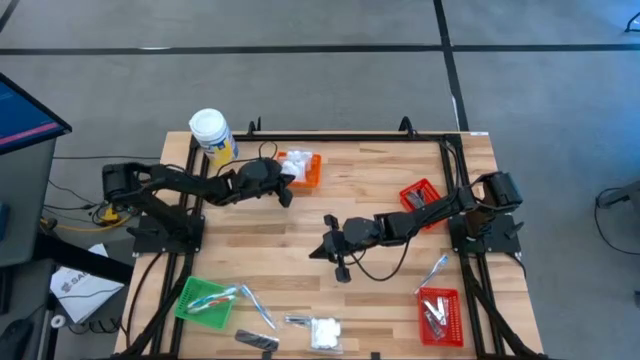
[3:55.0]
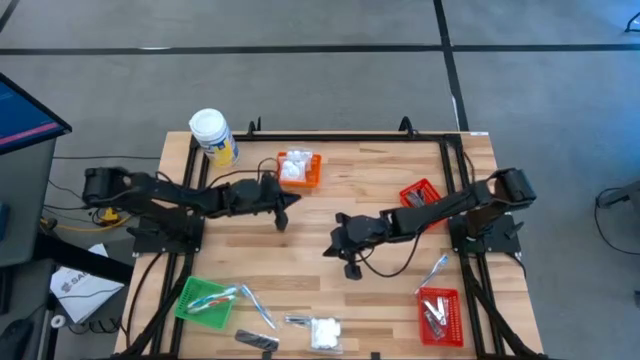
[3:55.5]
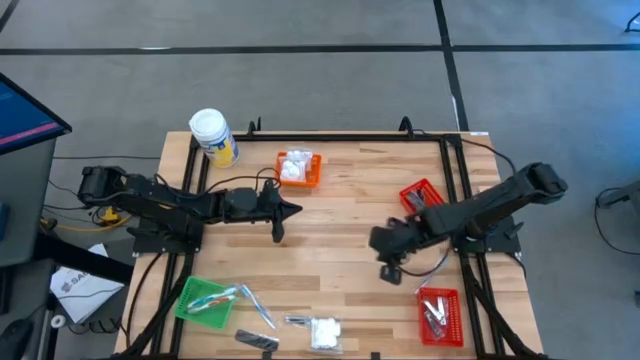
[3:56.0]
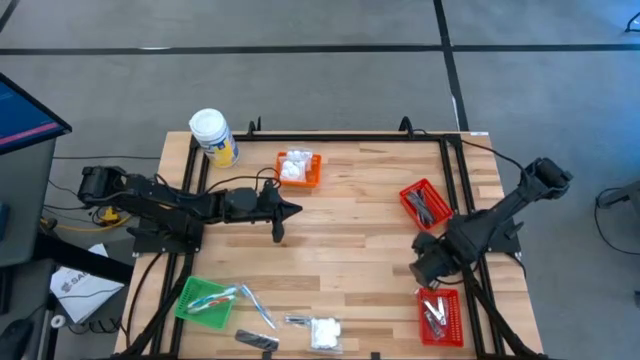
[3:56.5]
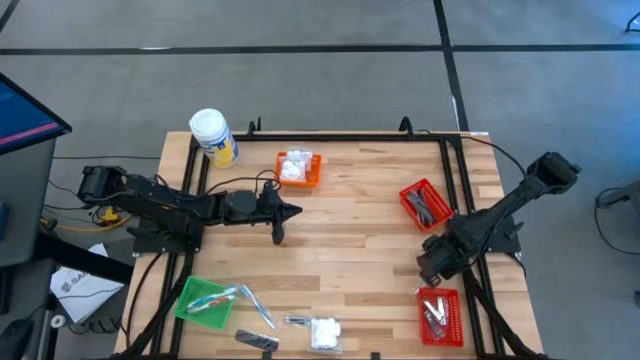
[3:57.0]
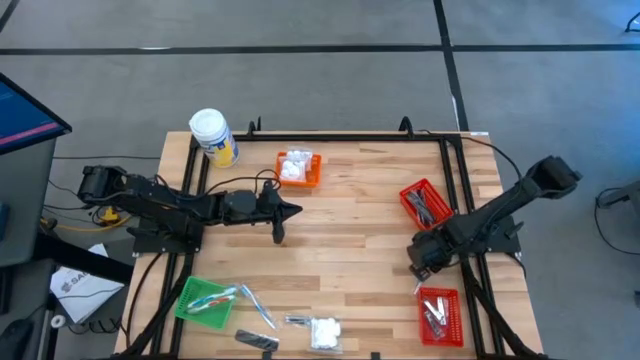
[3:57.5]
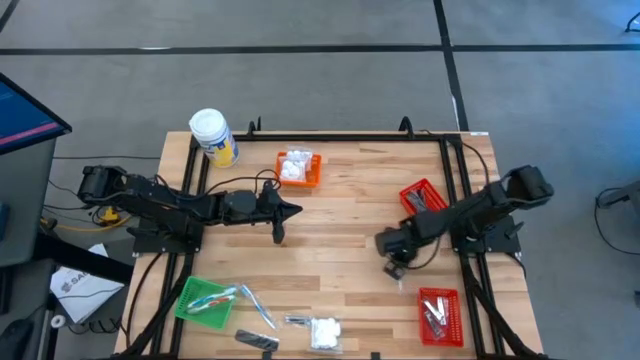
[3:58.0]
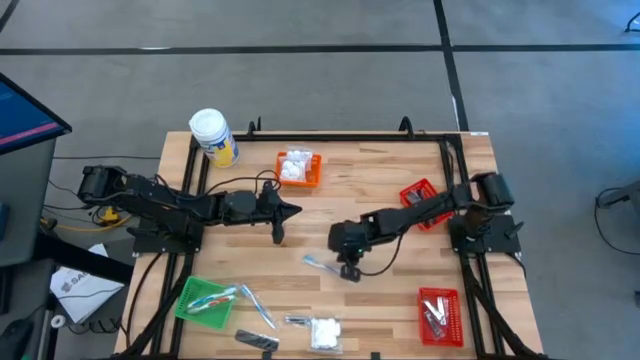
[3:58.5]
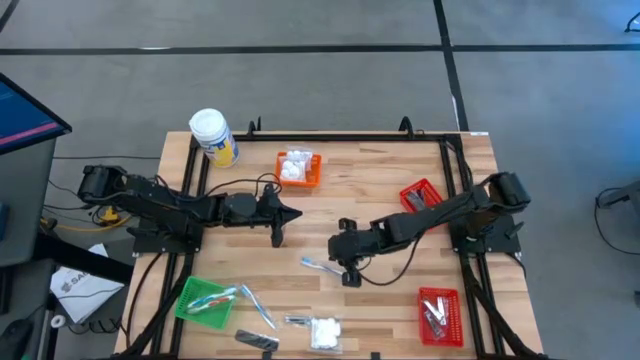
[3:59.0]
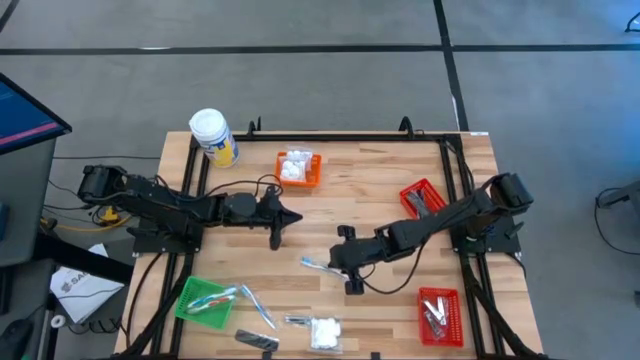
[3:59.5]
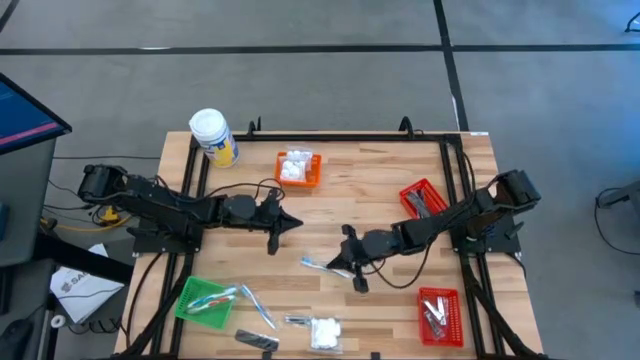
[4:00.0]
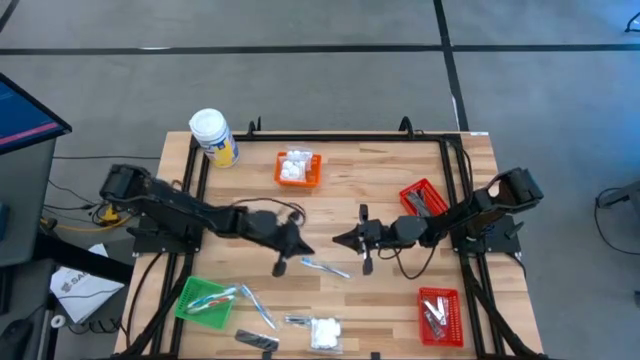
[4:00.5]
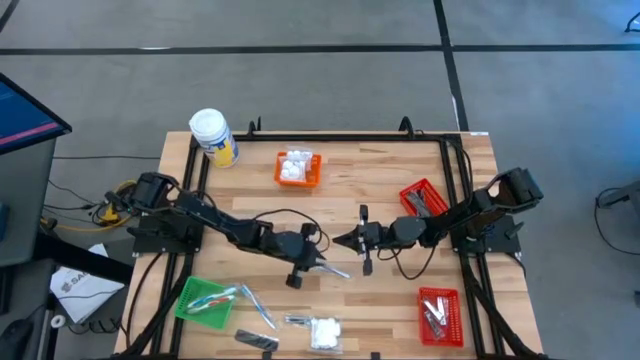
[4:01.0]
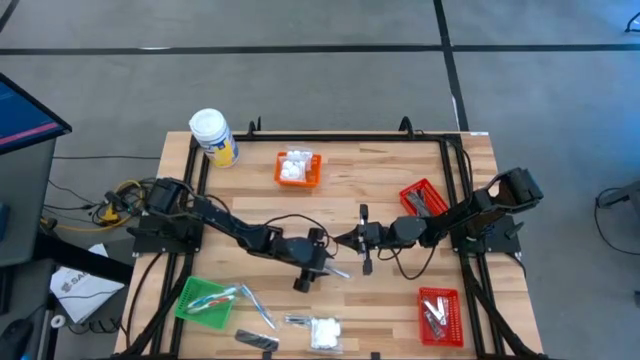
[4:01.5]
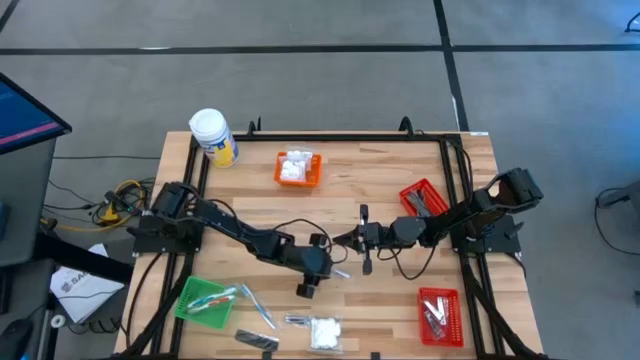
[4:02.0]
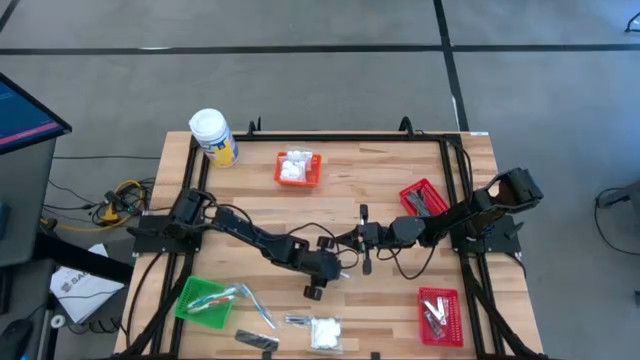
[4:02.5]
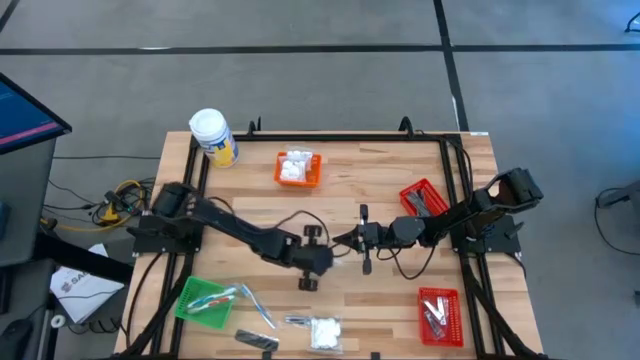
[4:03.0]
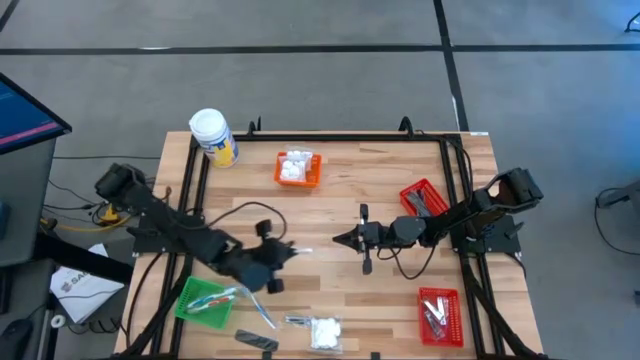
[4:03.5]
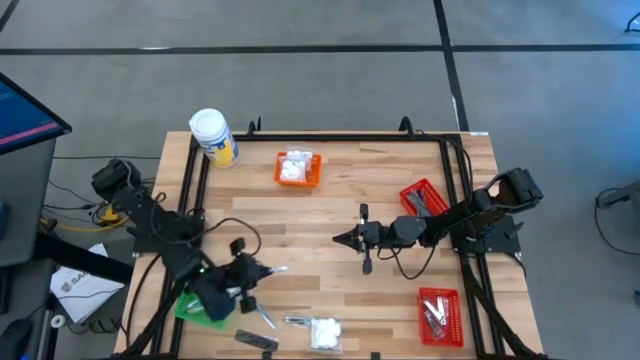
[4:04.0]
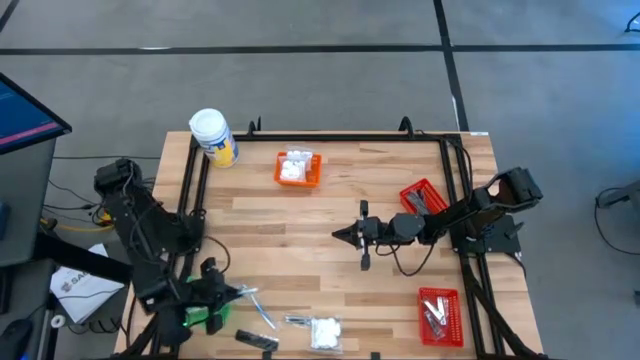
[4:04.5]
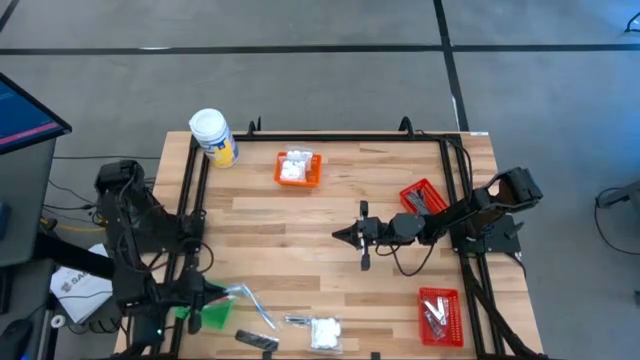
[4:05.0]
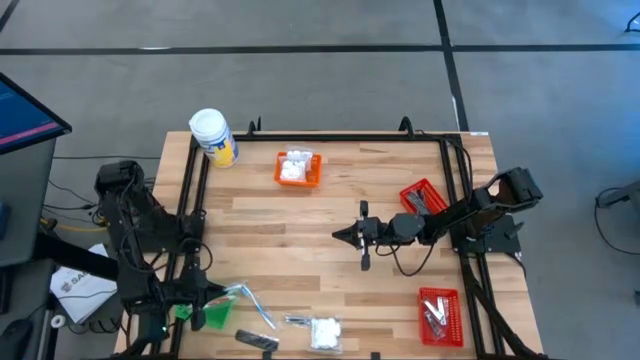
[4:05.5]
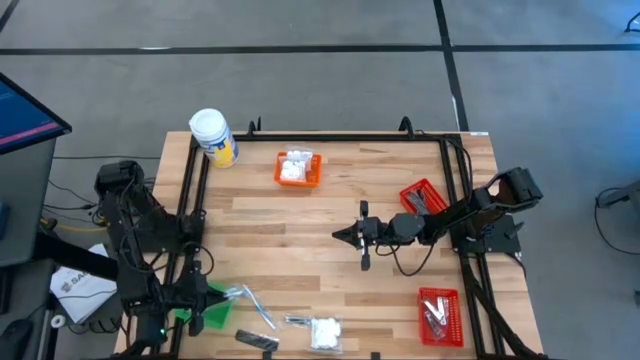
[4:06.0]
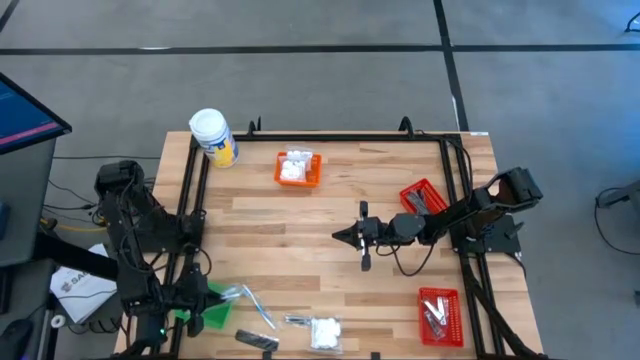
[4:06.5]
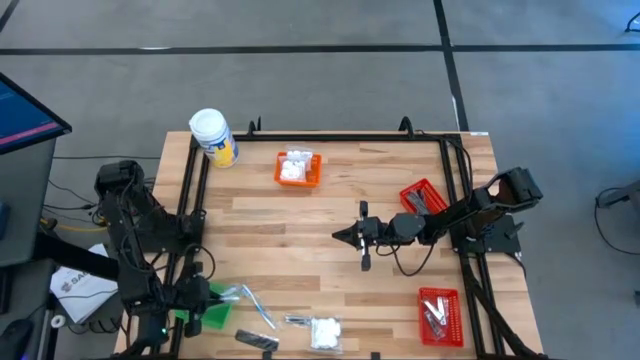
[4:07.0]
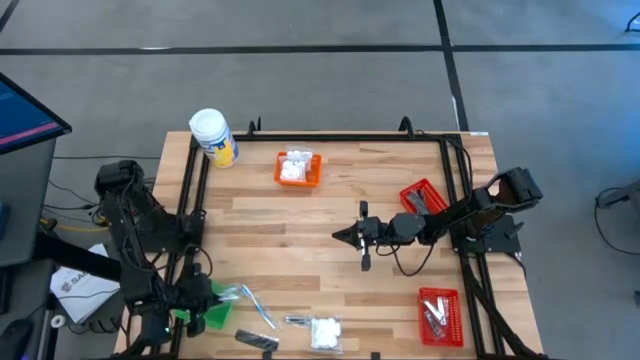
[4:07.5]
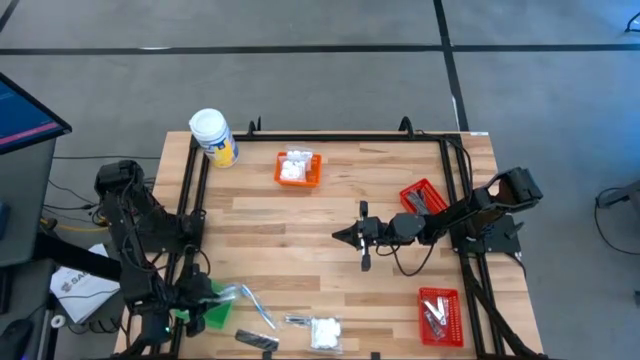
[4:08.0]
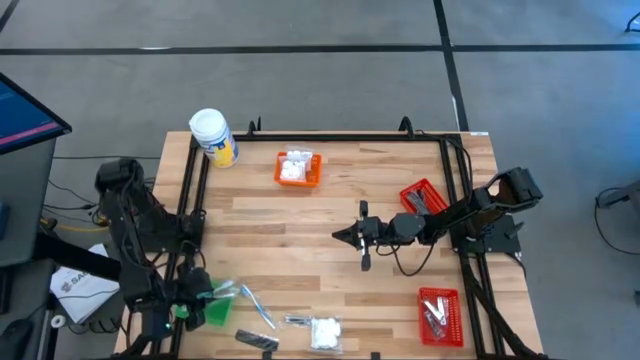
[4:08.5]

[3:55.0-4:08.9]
Task: Pick & Place Travel size toiletries
Put the blue toothbrush into the green basket

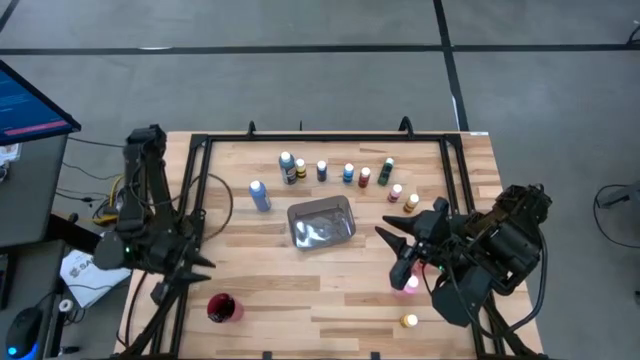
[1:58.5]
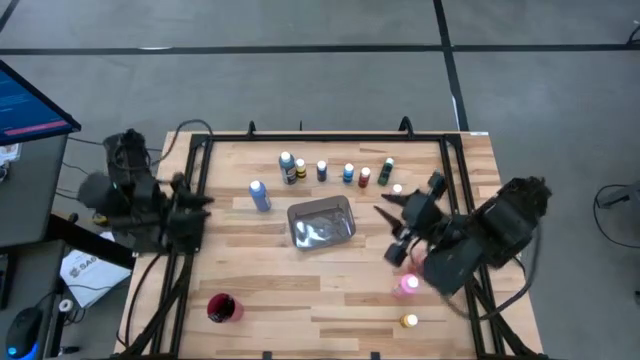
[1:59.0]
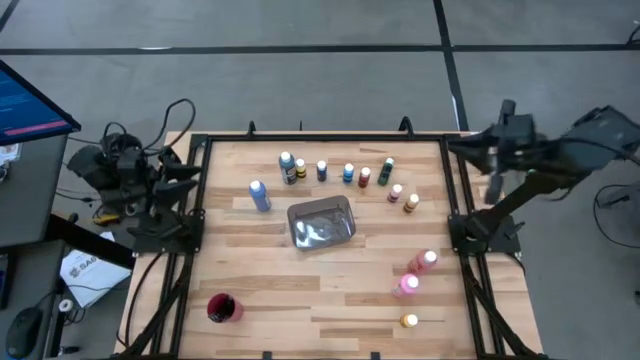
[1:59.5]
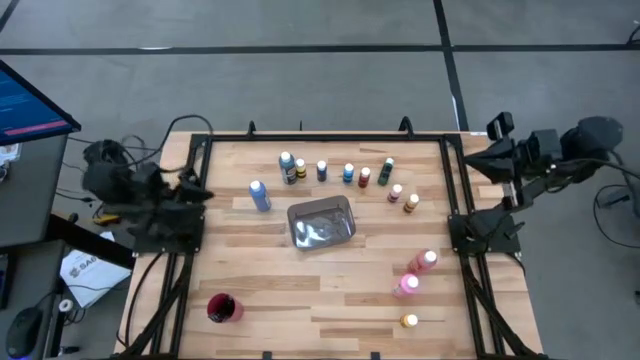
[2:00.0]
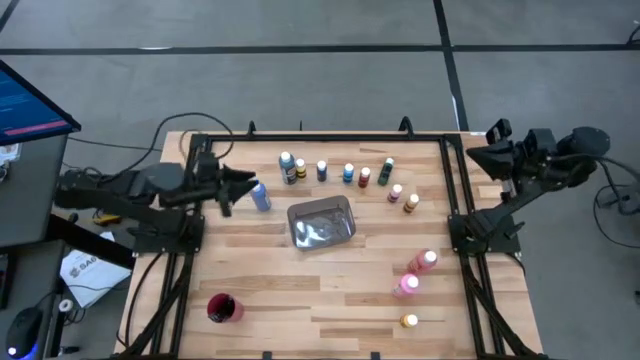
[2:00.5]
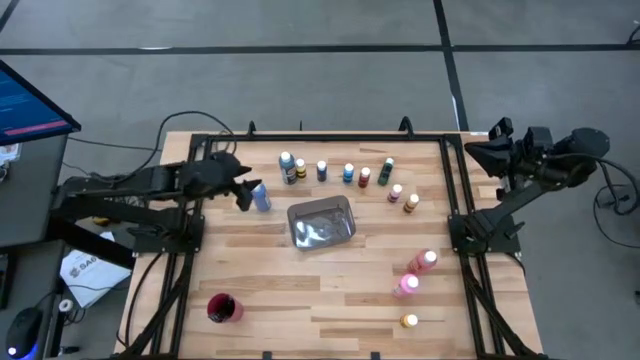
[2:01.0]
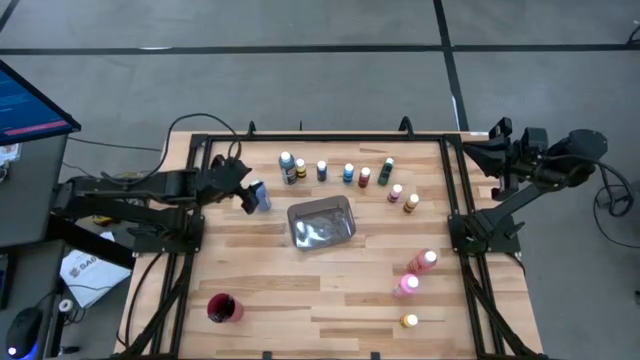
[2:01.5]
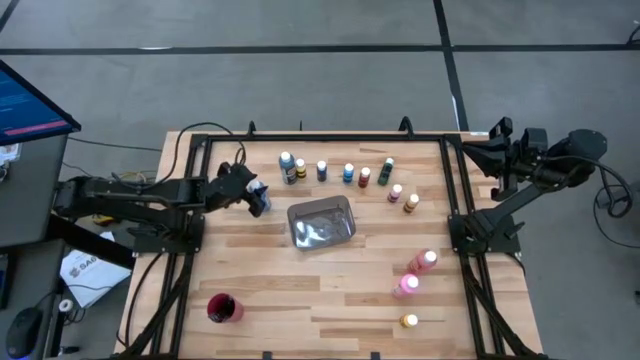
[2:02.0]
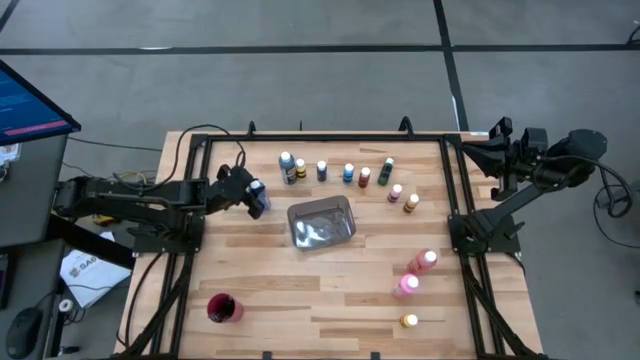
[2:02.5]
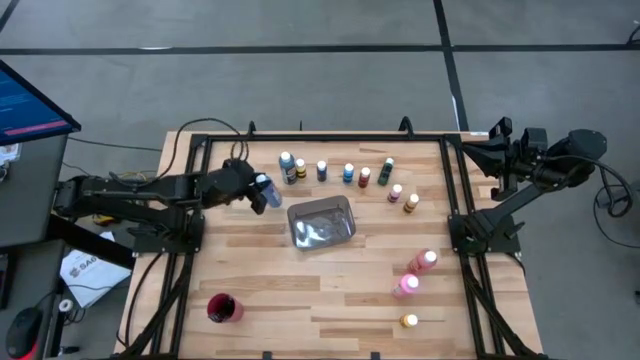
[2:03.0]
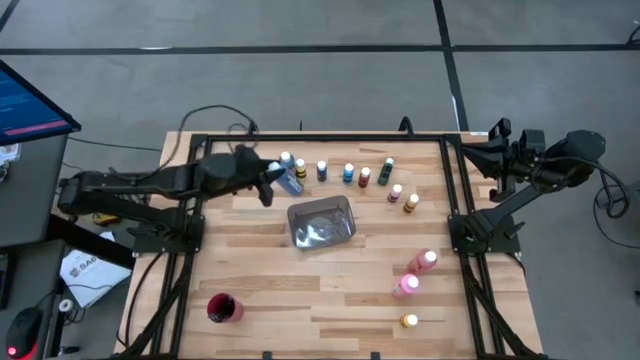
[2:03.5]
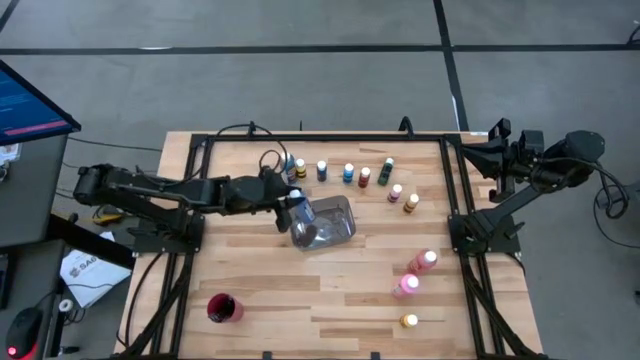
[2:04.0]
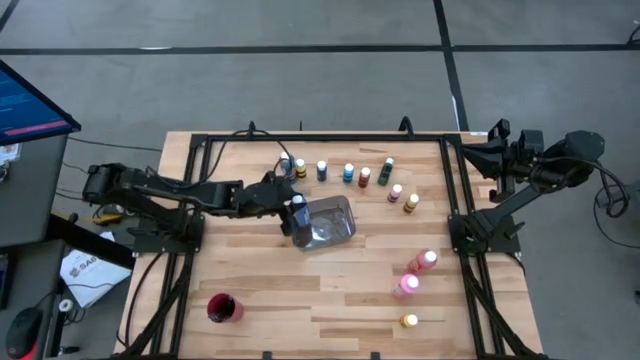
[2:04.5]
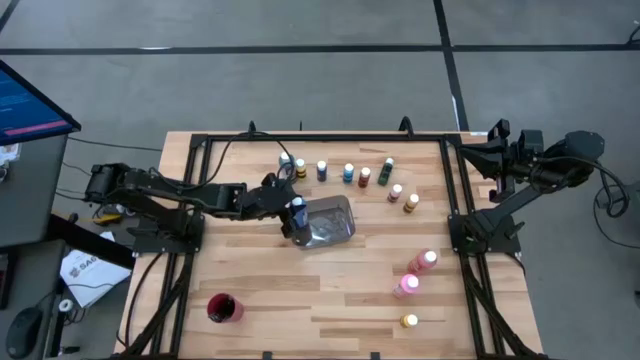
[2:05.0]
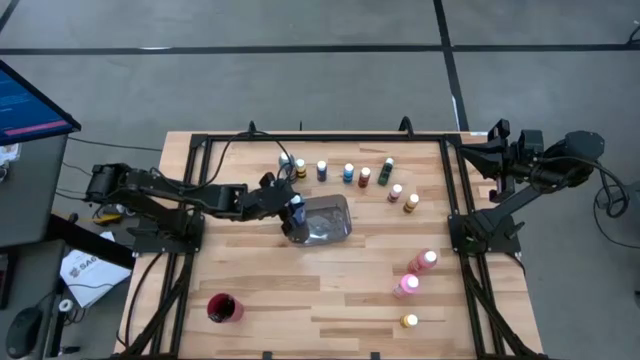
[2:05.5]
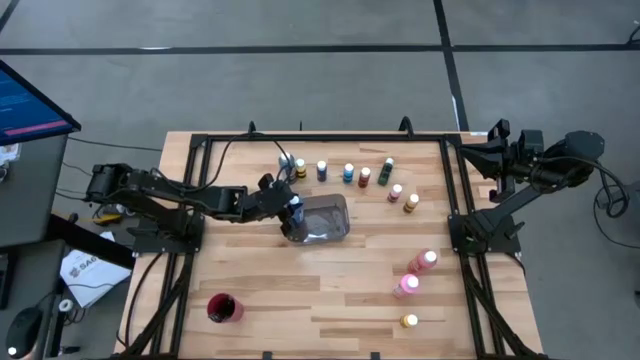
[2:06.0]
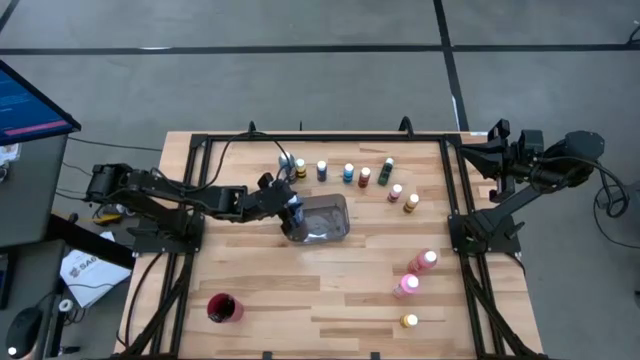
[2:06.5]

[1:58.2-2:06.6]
Task: Pick & Place Paint Supplies
Put the large purple paint bottle into the black bin
